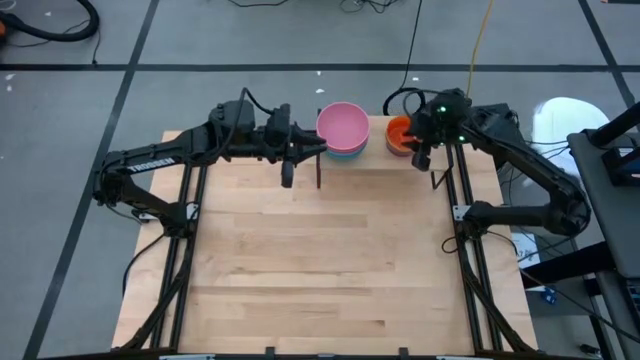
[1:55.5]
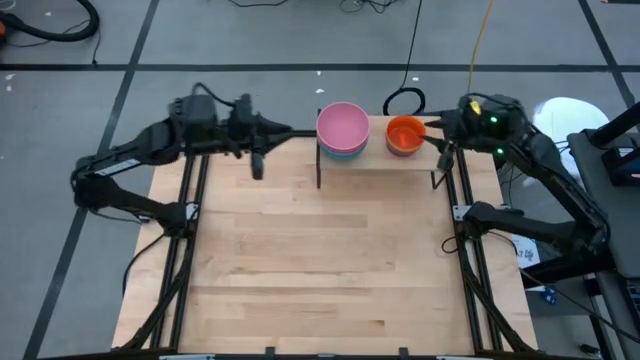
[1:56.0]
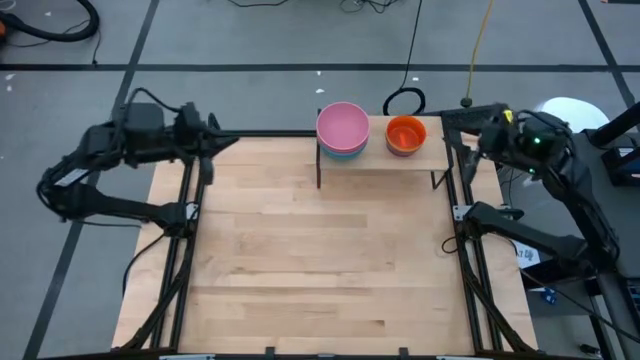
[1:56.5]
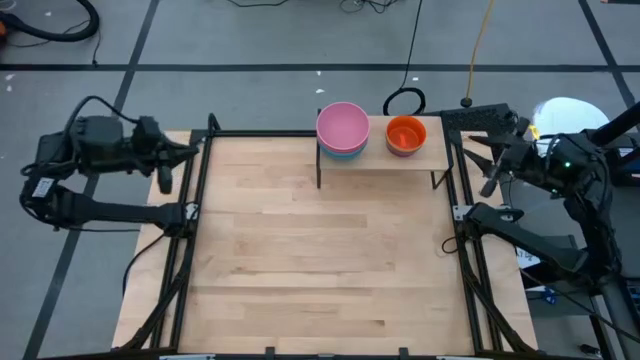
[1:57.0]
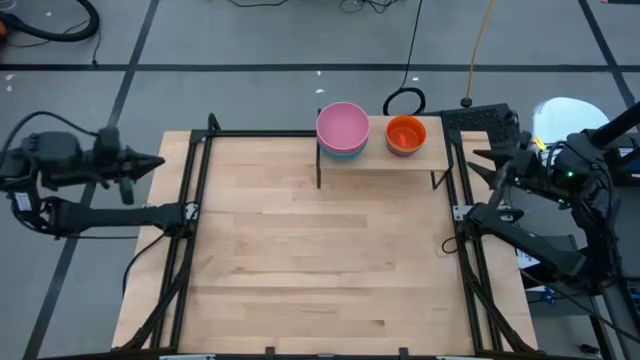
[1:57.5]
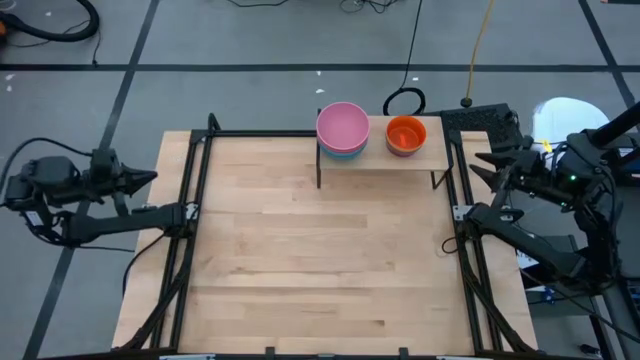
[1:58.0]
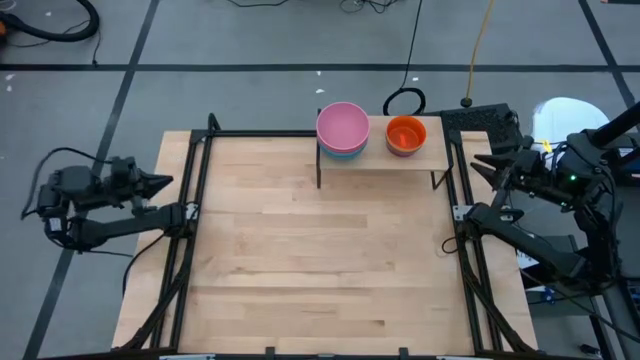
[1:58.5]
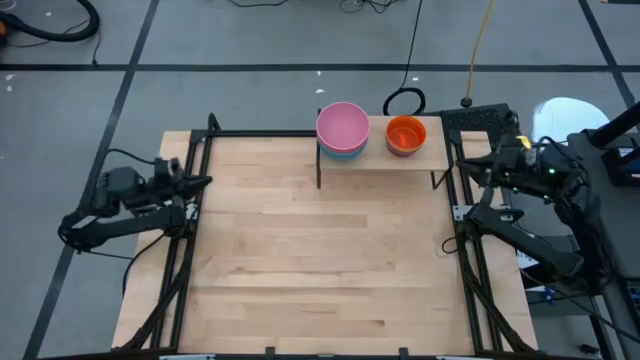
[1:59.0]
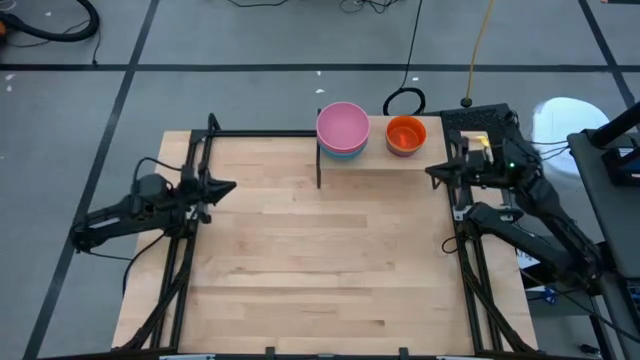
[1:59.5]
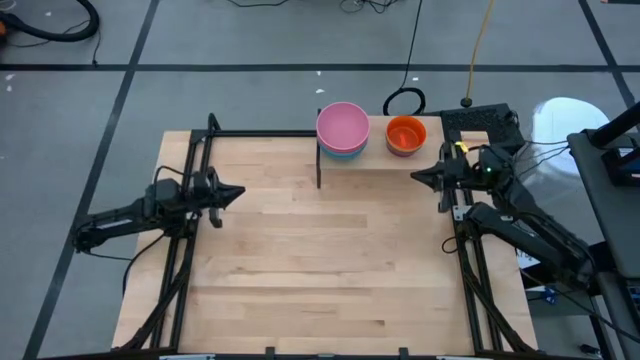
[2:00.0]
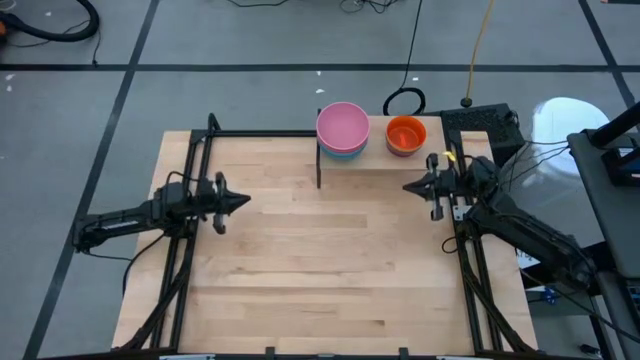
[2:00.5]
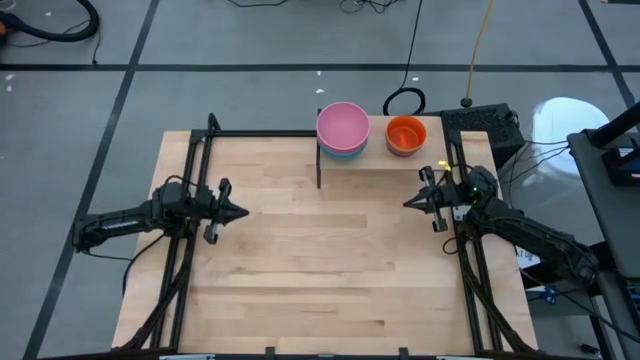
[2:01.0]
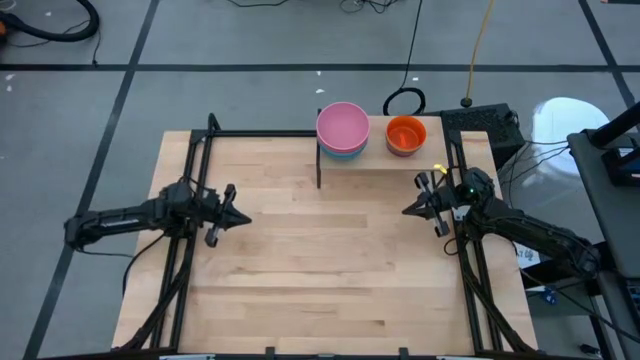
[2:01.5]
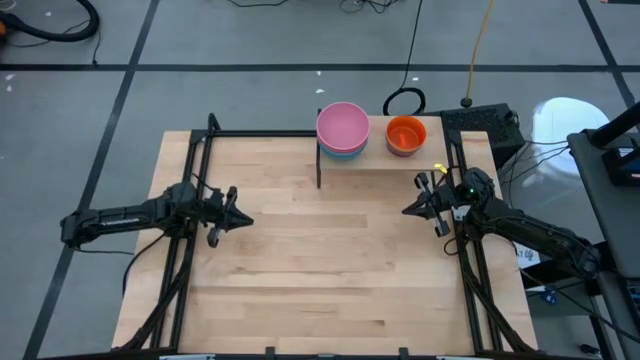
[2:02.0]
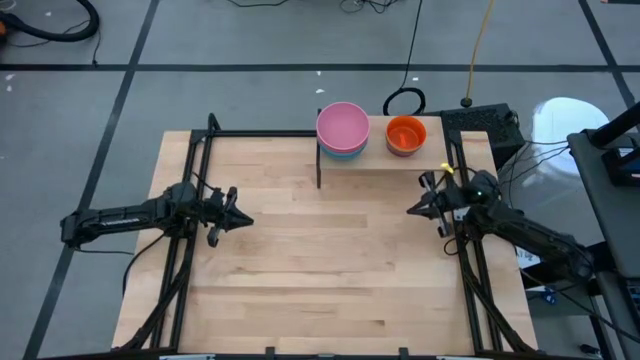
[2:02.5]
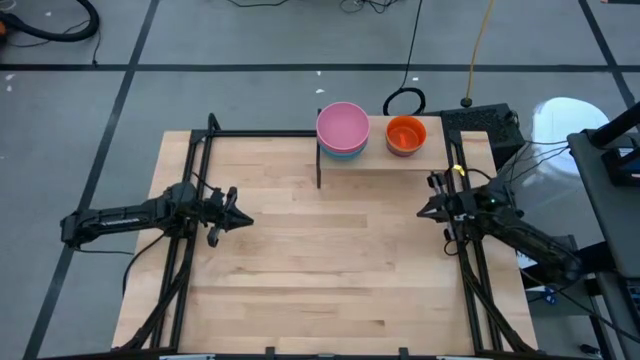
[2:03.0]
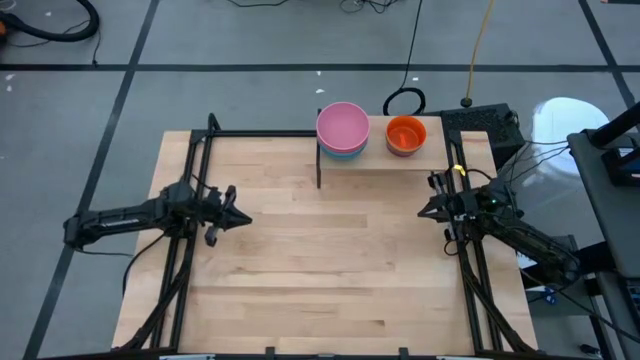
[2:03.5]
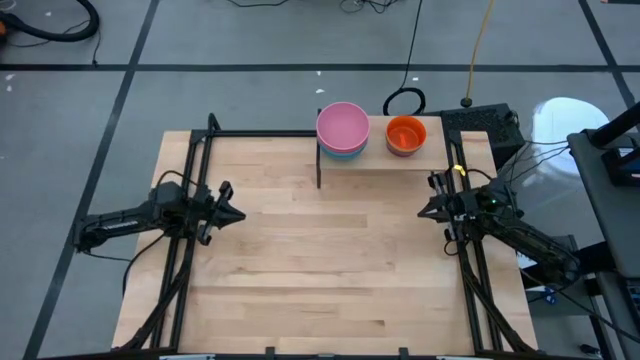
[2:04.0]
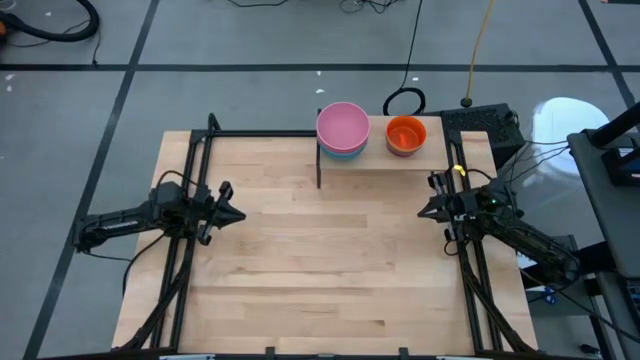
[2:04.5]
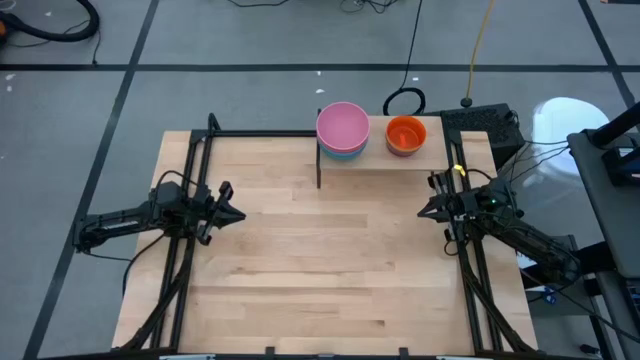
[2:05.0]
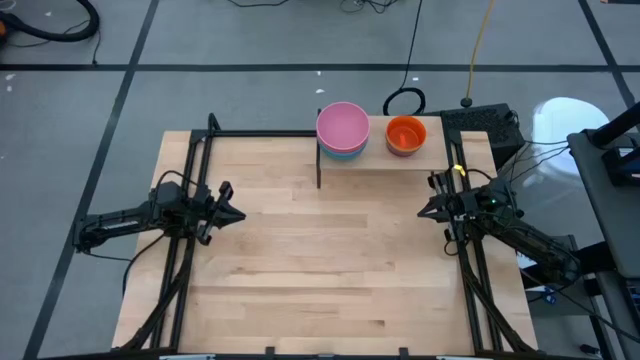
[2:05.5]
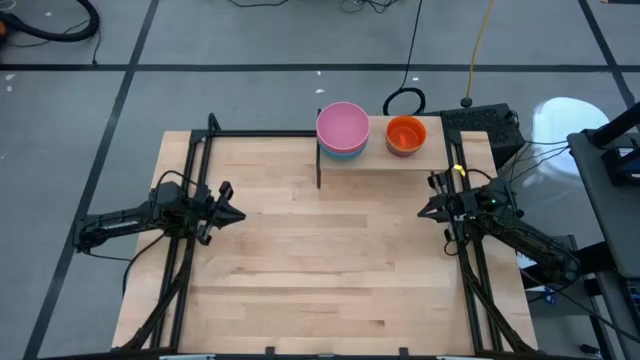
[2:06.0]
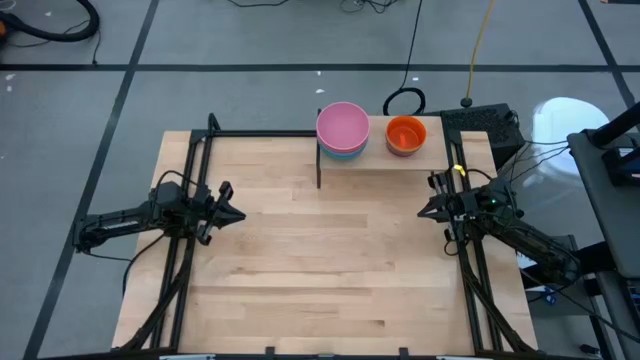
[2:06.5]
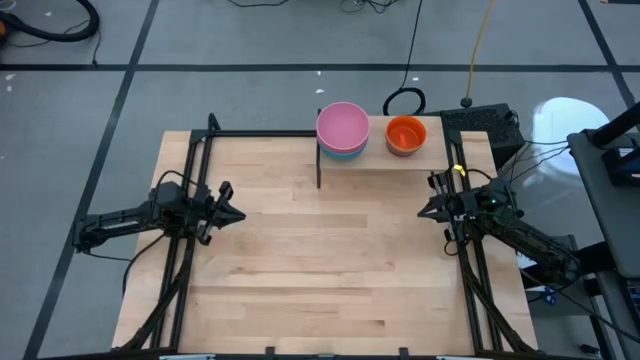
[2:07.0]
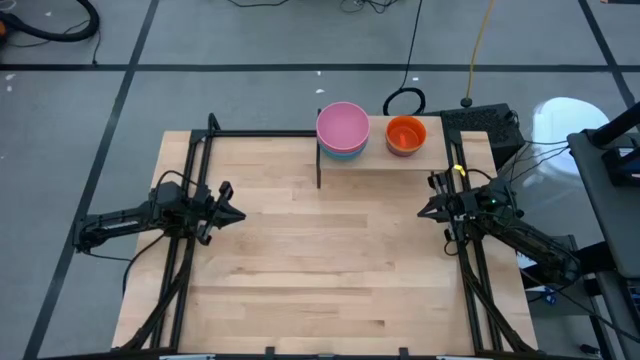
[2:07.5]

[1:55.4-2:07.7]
Task: Place and stack bowls onto a shelf
Return to Home Position

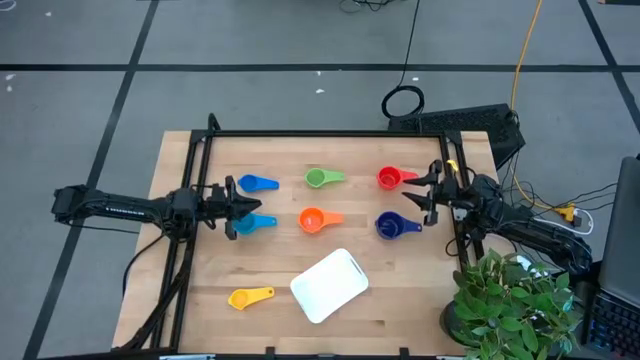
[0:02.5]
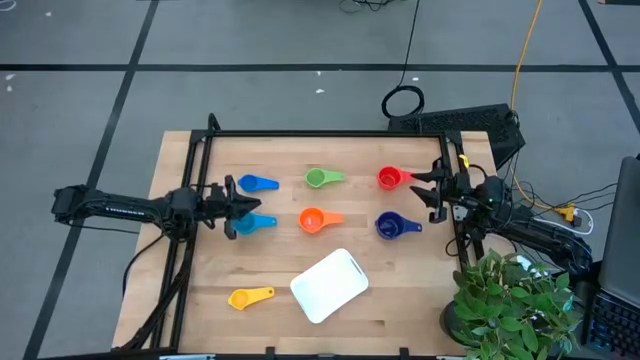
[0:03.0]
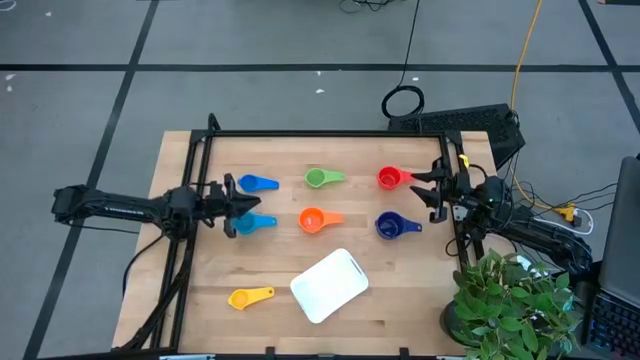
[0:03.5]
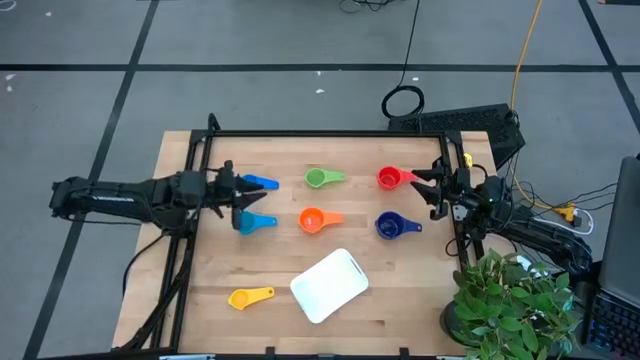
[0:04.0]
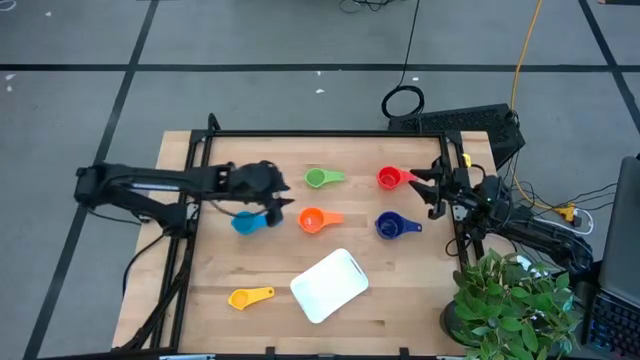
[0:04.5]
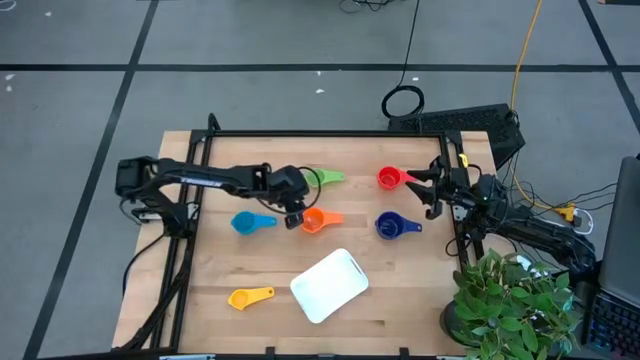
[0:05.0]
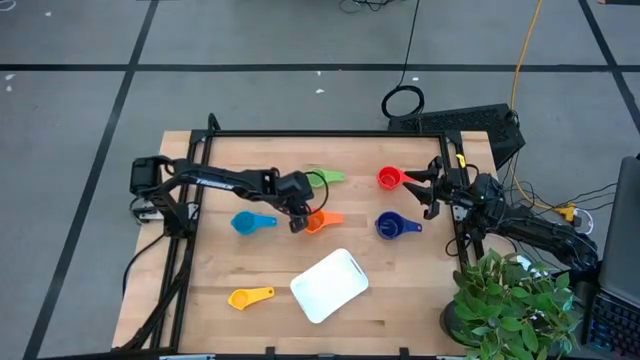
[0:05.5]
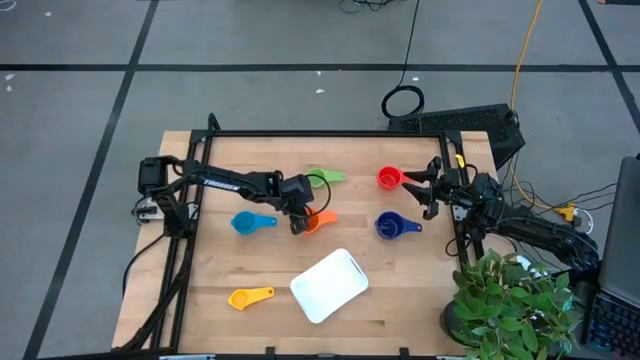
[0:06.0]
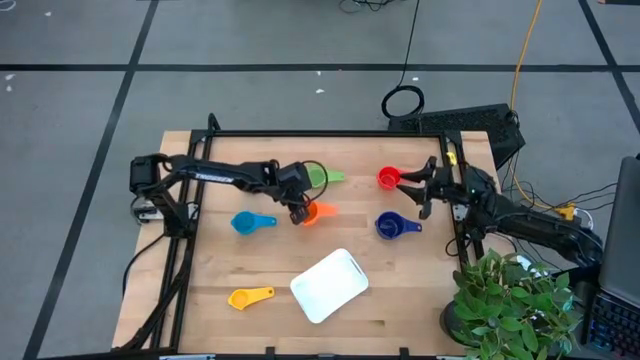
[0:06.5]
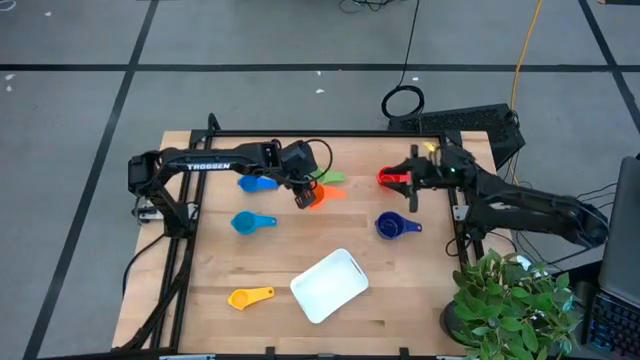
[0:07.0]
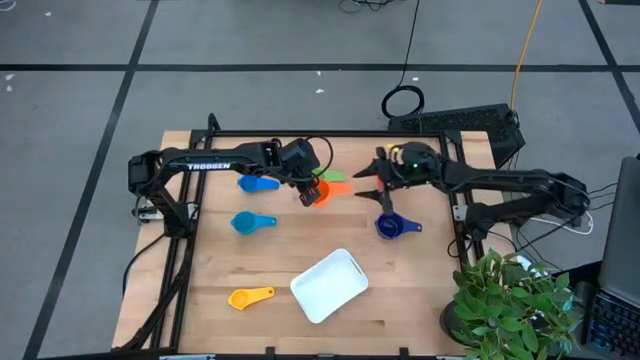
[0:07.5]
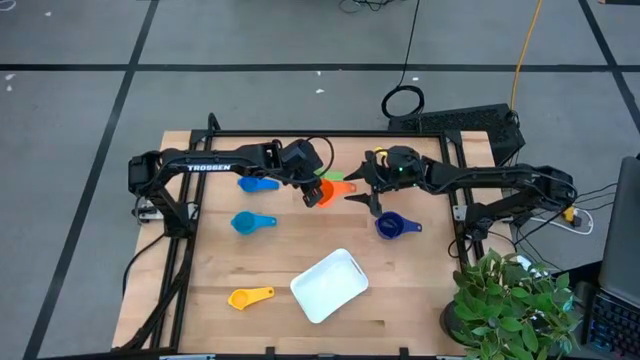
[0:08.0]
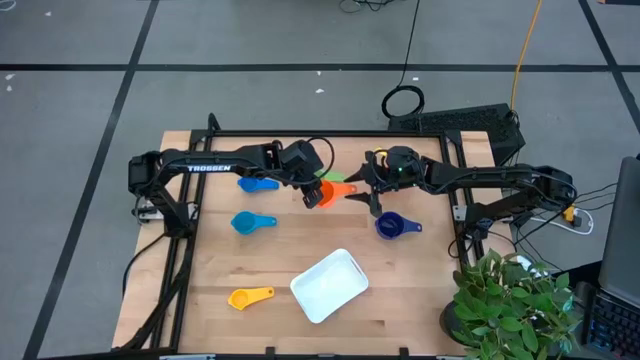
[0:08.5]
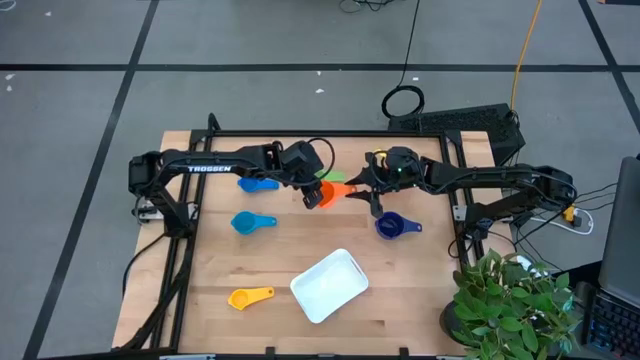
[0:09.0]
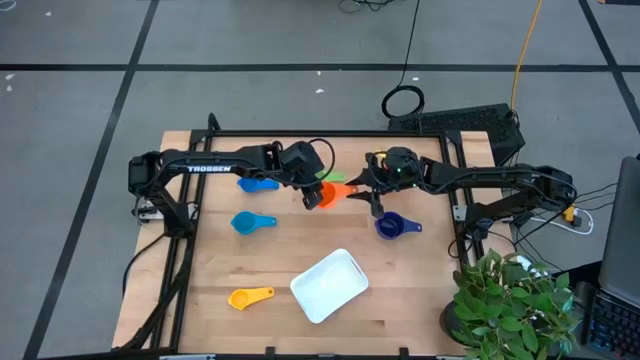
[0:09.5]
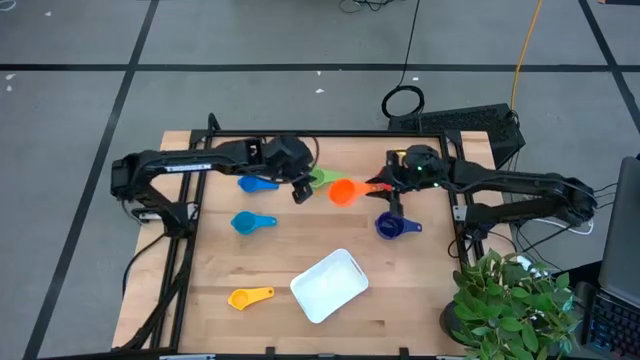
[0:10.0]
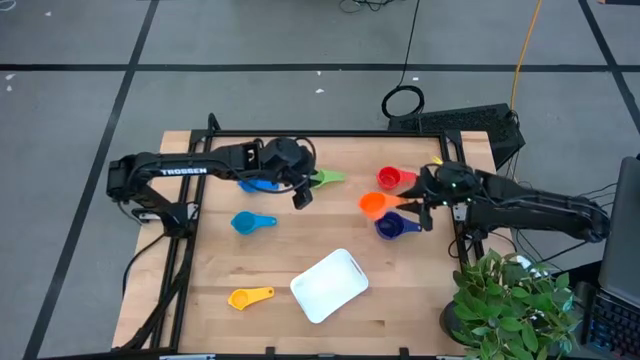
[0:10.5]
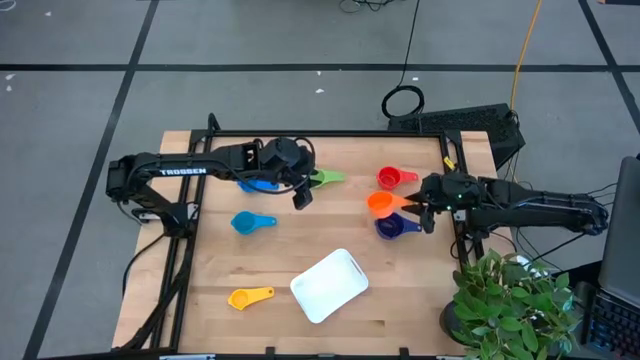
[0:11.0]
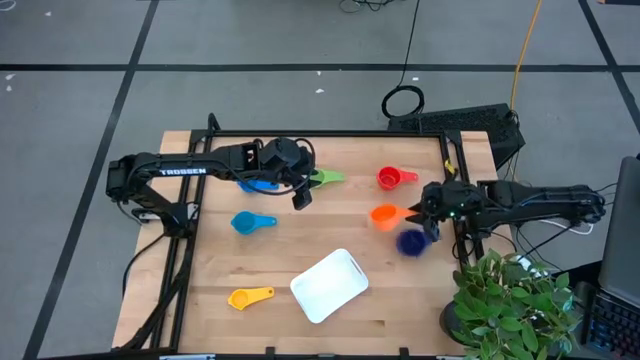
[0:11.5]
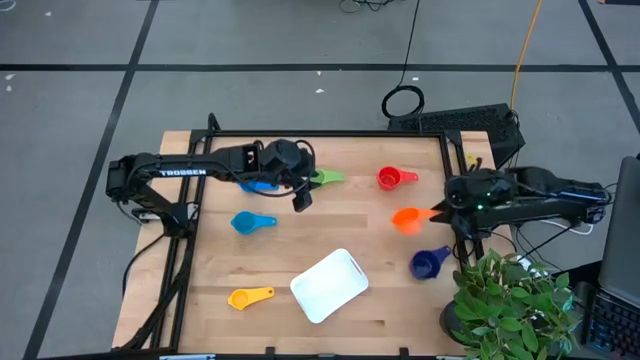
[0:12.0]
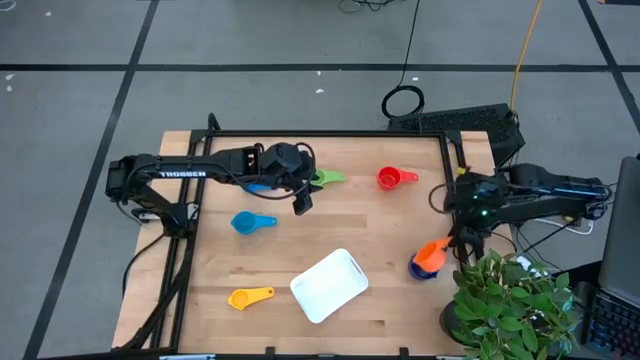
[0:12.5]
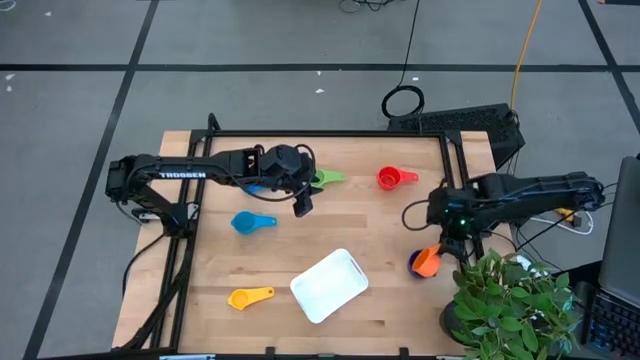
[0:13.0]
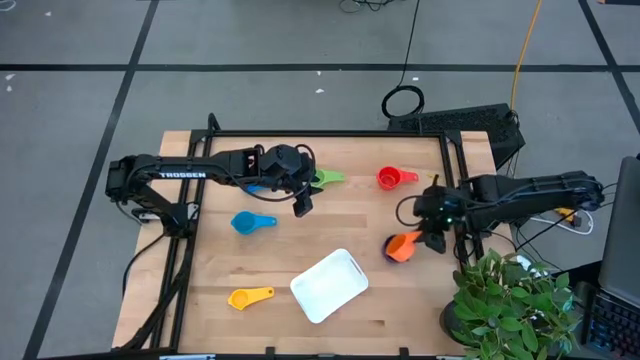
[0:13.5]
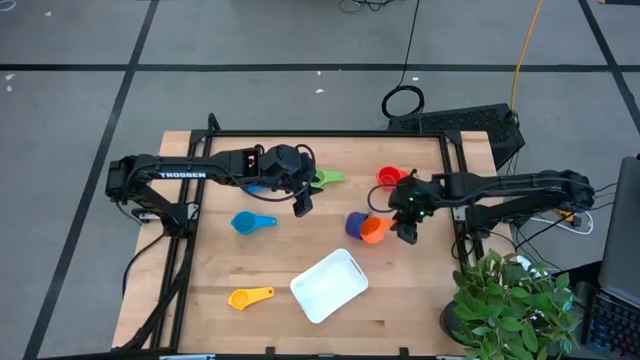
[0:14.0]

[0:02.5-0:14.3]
Task: Nest measuring cups in basket
Stack the orange measuring cup on top of the dark blue measuring cup
